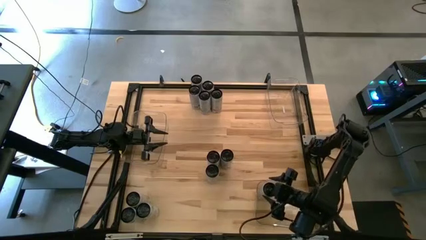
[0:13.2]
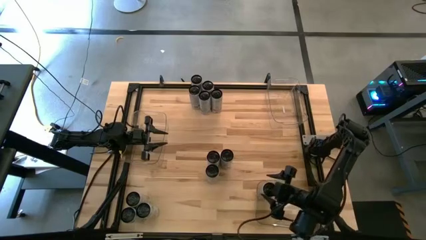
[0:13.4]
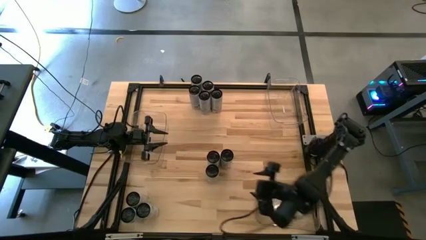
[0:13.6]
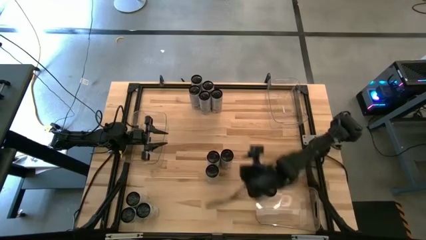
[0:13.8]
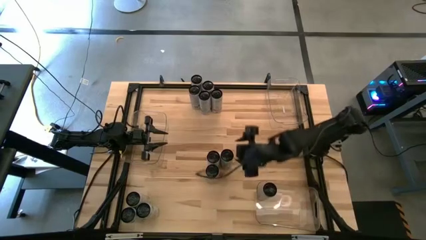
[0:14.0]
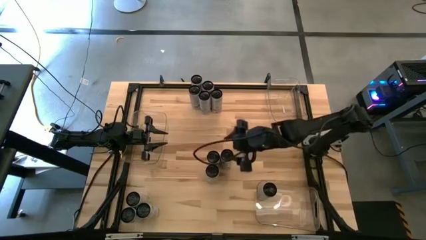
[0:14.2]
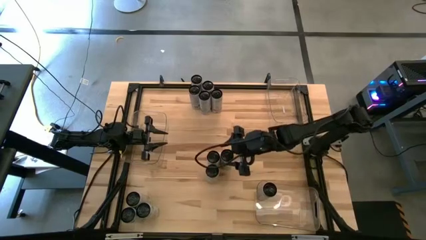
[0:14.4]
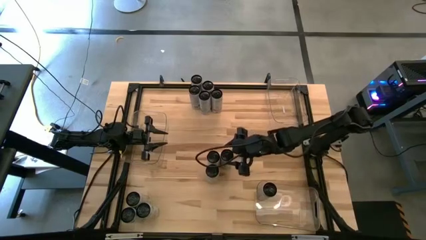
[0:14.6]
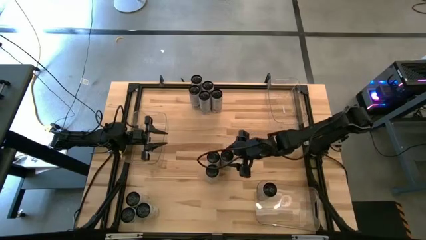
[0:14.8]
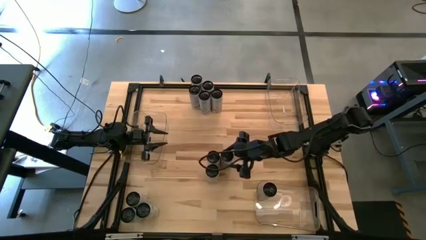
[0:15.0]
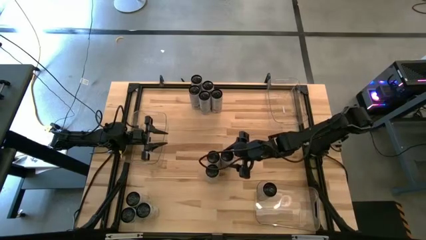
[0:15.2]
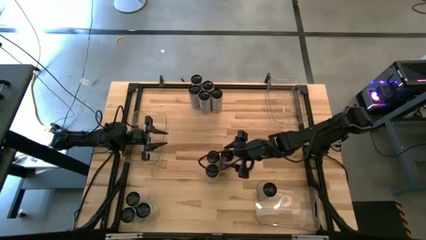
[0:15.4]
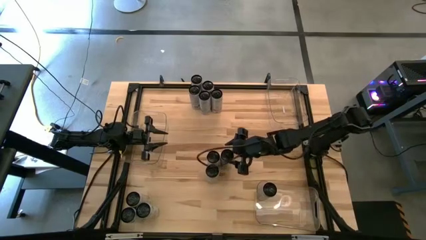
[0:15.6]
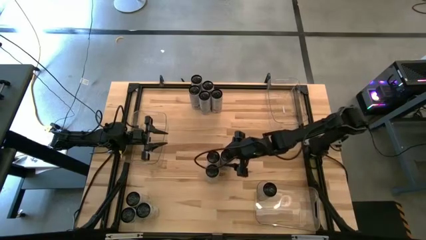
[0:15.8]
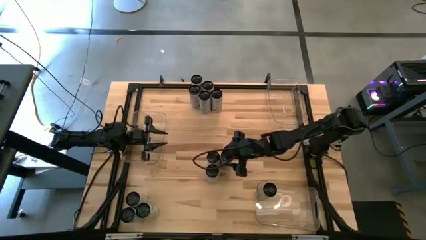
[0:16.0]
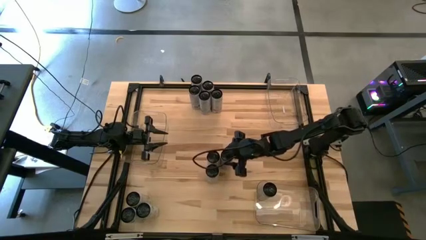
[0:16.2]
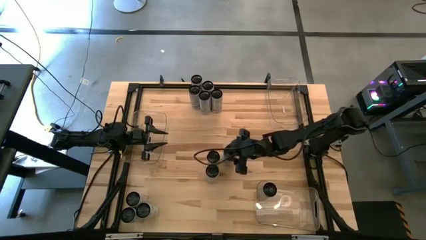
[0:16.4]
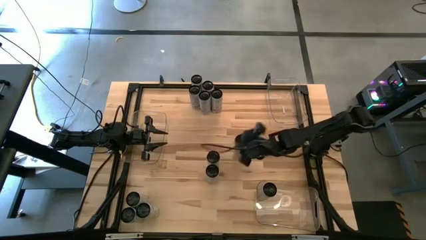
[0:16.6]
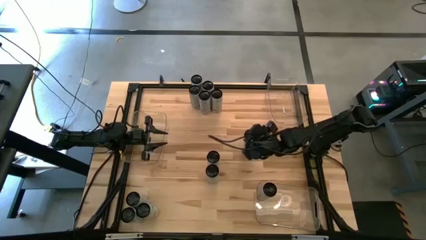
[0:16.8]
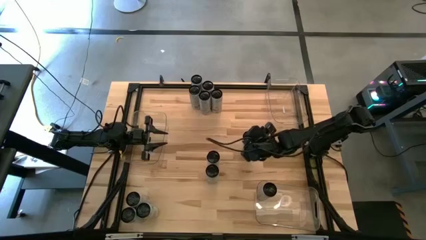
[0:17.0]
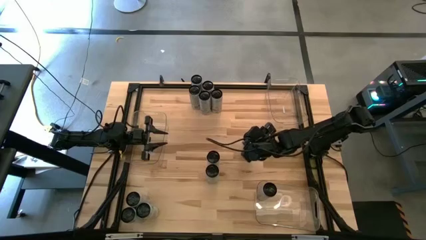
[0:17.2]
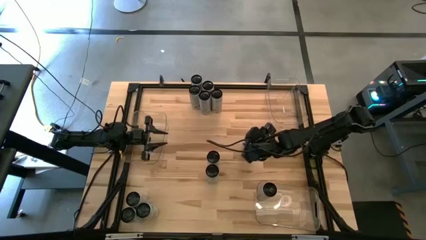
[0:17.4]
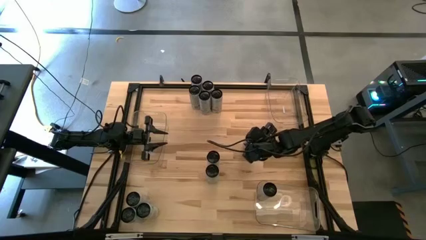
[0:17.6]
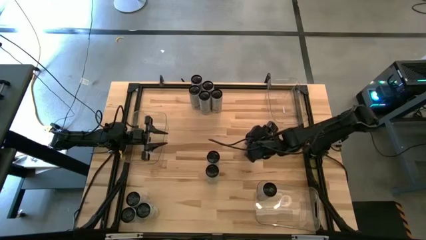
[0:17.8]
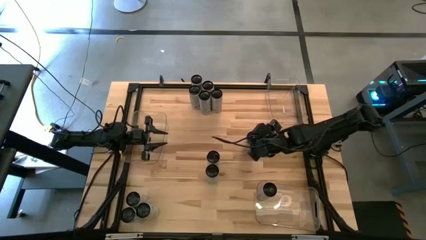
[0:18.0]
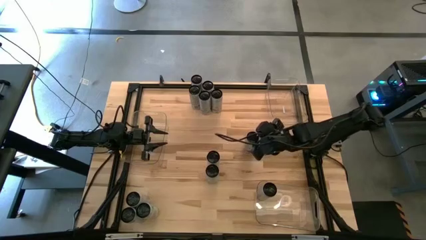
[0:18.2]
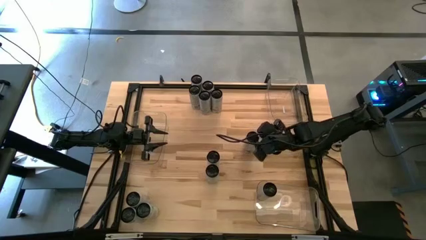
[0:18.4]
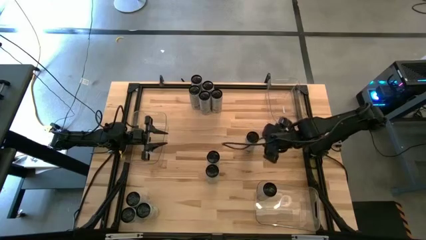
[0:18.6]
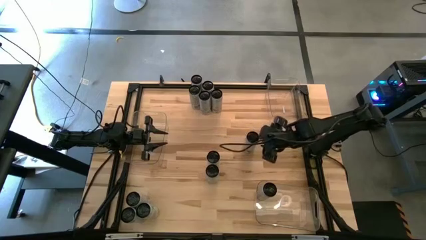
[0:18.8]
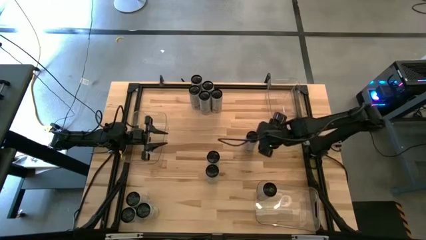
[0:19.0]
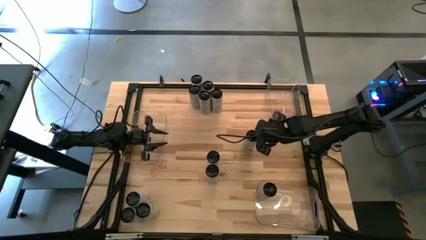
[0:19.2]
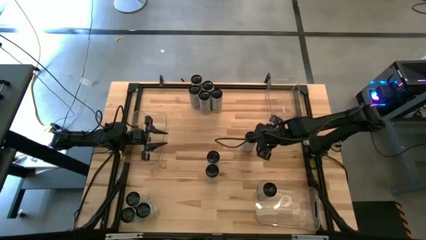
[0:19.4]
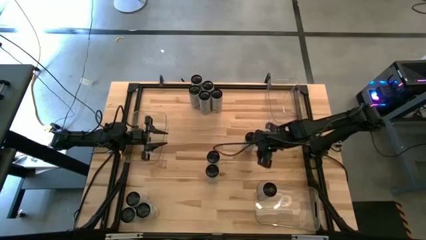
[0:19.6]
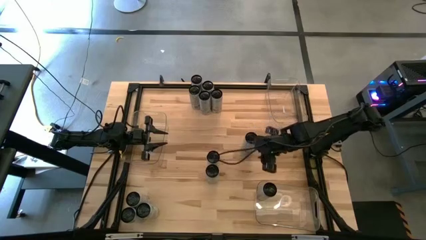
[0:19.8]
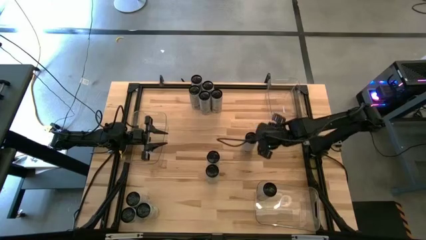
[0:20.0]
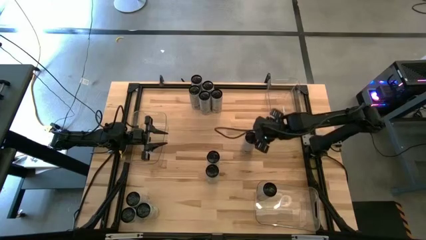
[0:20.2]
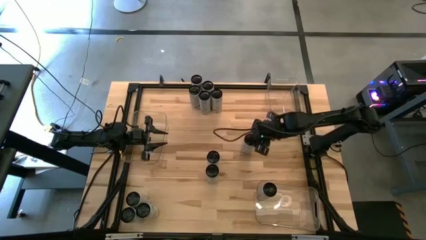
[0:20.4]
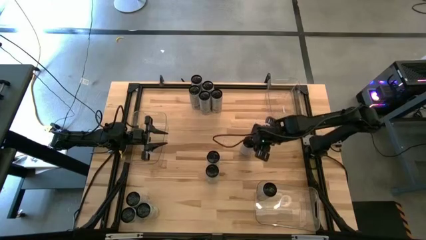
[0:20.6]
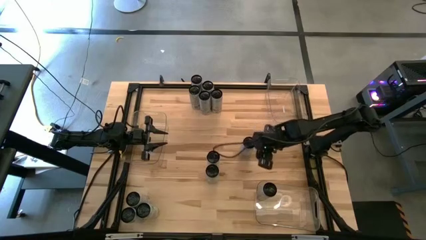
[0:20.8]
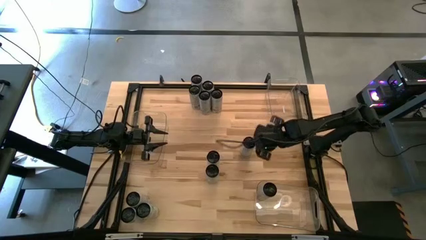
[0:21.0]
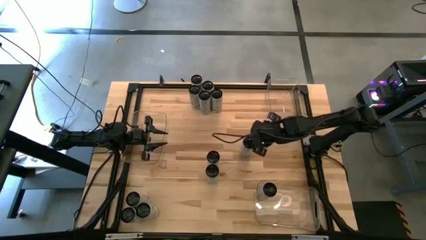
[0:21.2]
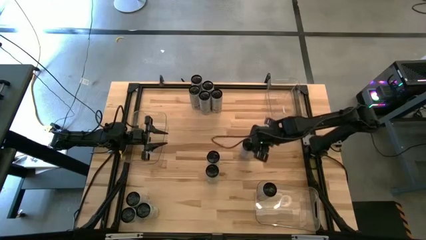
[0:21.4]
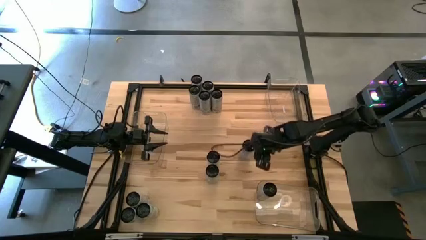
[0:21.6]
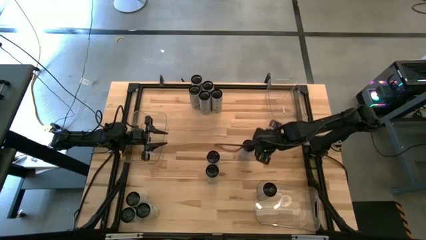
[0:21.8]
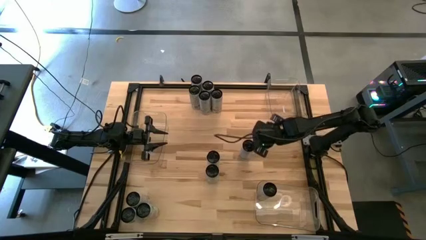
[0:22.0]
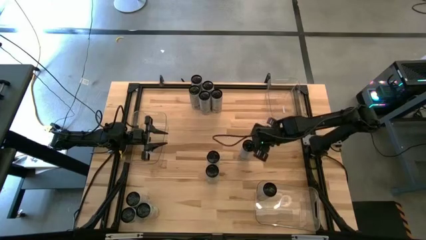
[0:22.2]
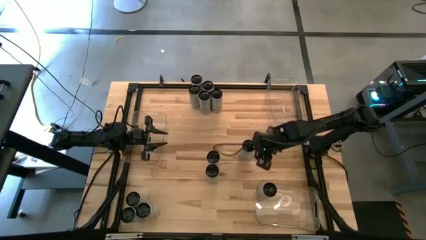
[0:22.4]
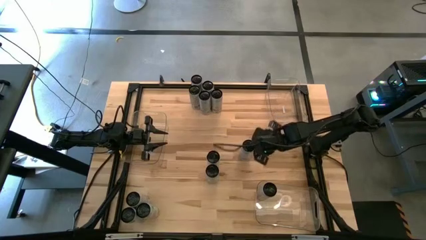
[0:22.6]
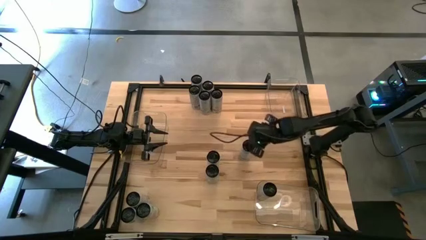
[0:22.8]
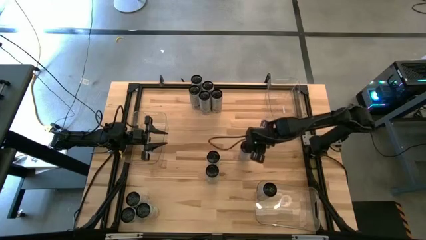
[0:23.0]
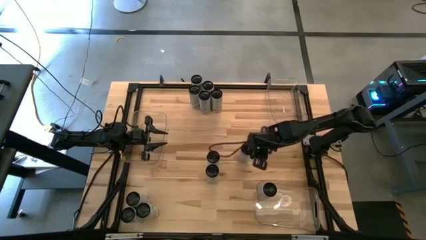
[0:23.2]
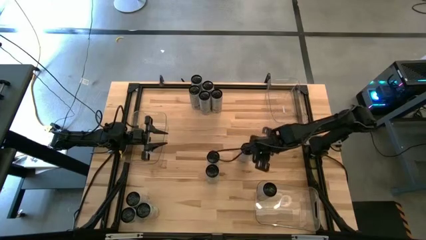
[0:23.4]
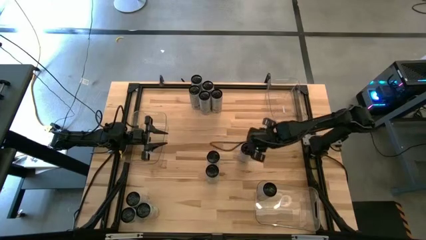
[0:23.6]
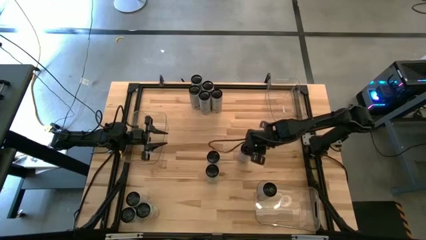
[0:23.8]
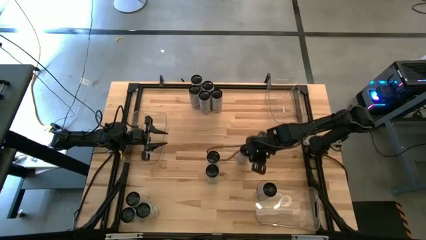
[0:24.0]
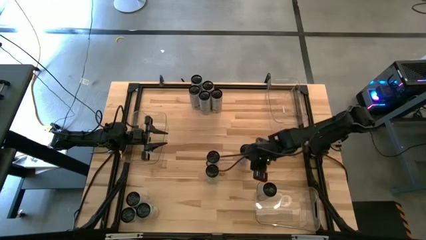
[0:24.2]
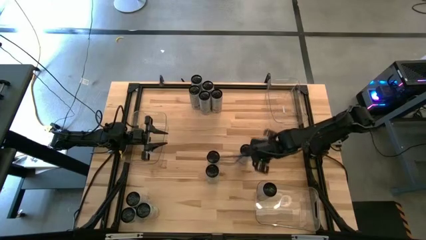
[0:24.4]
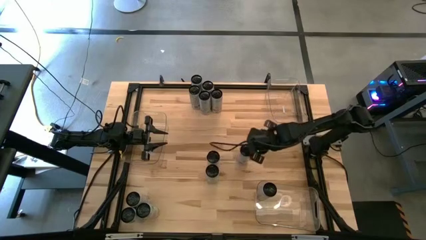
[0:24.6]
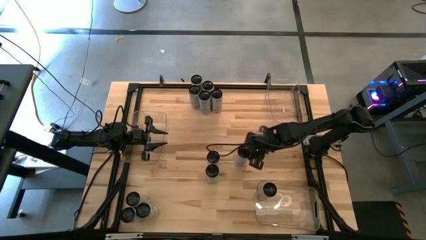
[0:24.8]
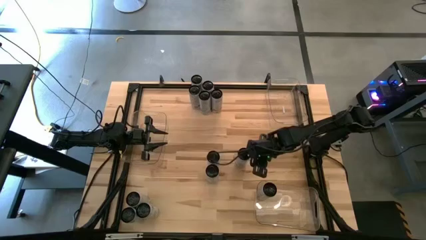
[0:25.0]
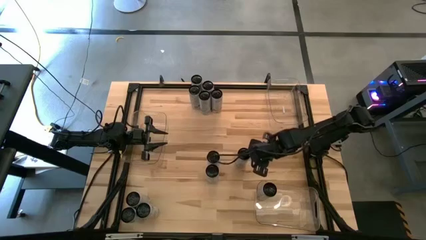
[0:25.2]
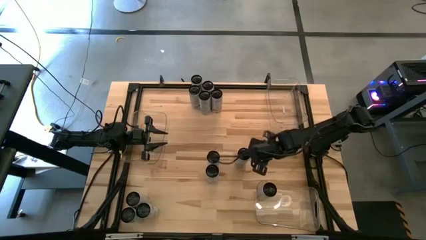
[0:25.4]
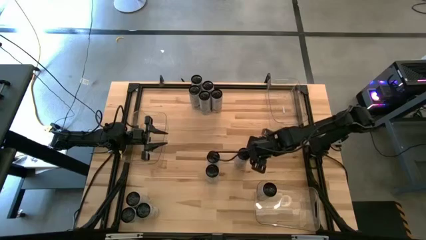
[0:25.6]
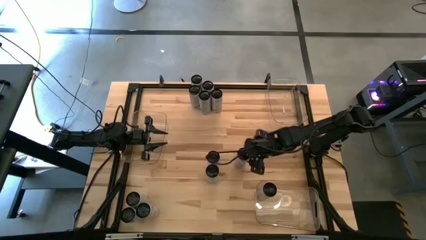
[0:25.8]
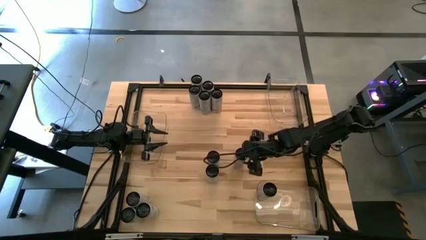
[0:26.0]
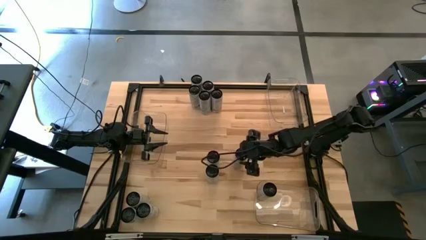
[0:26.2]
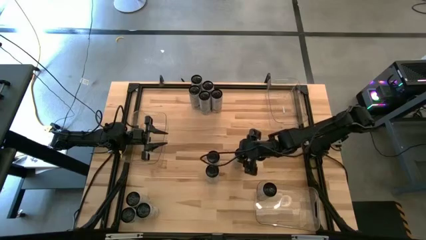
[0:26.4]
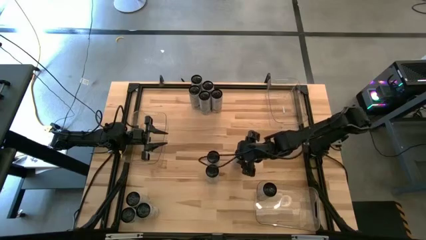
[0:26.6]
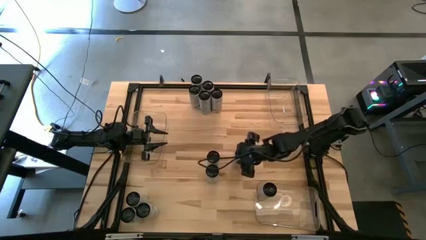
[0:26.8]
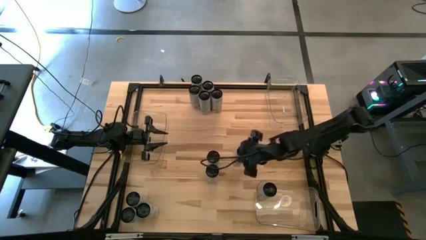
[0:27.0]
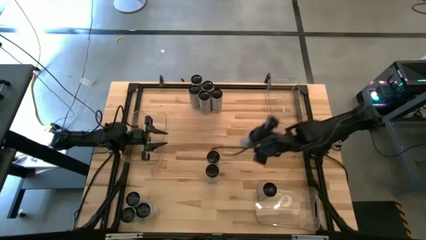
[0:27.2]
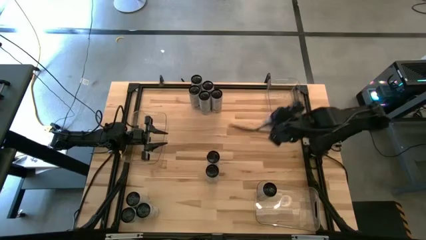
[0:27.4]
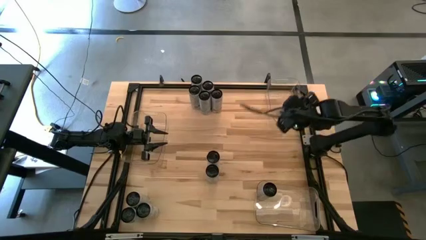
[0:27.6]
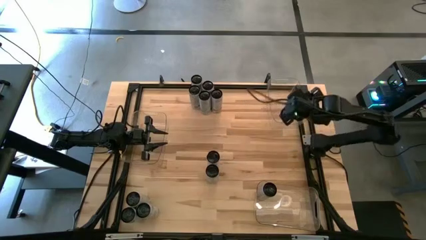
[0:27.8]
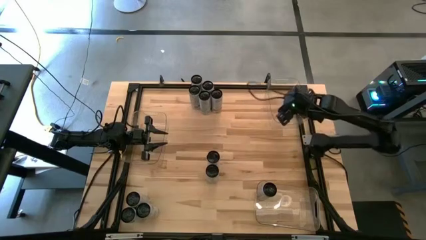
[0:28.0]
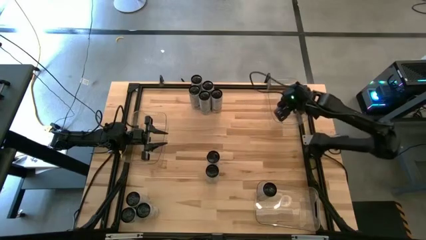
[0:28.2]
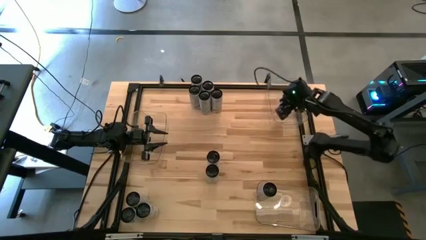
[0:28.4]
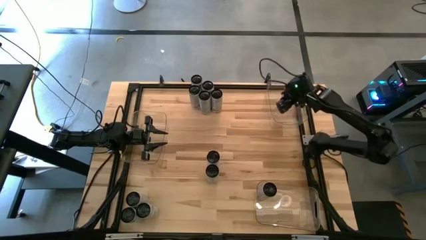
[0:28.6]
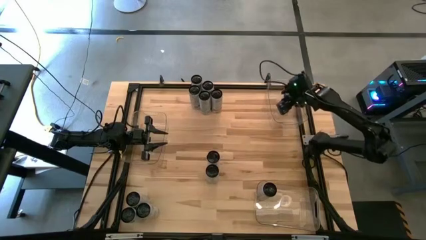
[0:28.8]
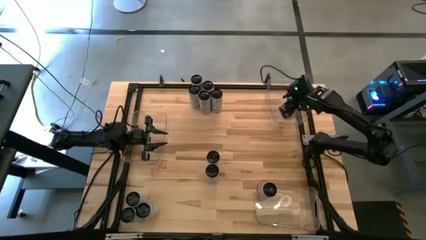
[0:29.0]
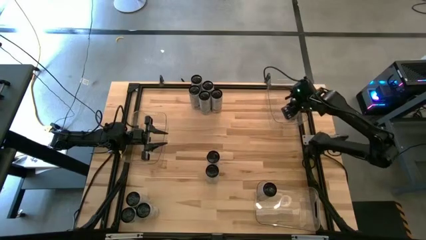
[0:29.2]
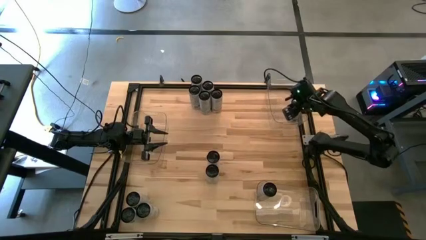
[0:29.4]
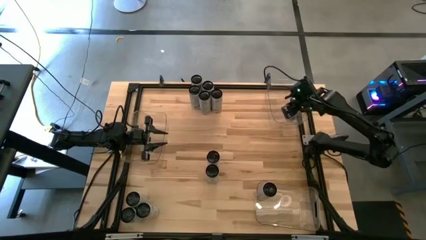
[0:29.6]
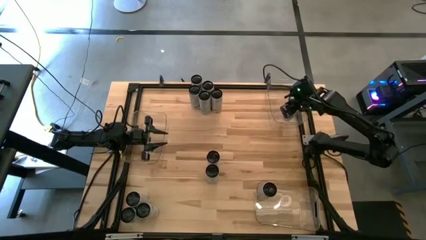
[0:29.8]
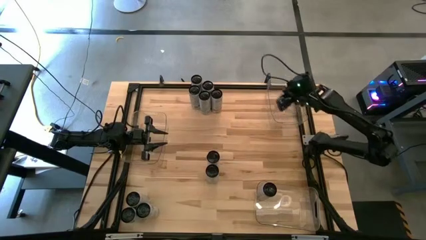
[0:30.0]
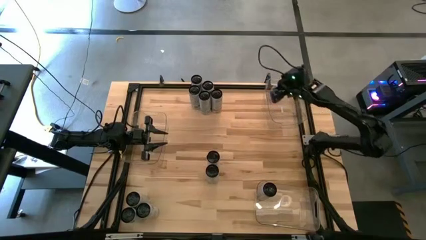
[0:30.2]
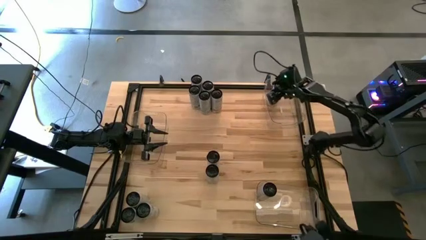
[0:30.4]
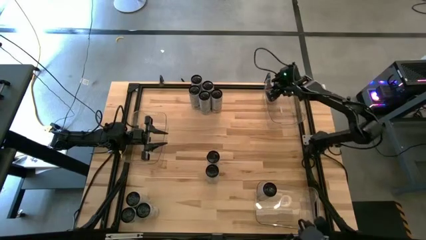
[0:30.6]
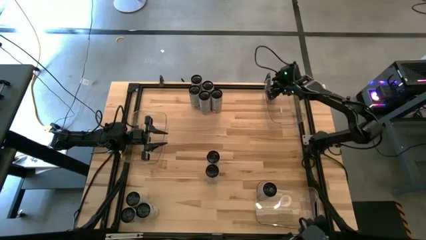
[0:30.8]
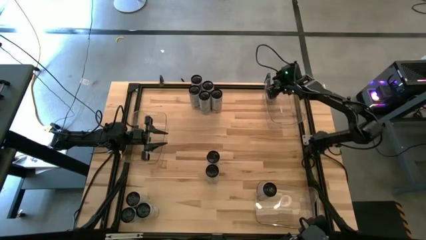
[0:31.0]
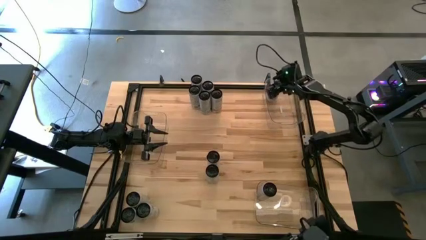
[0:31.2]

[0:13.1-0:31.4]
Task: Sort soda cans
Put the white-blue soda can into the top transparent bin
